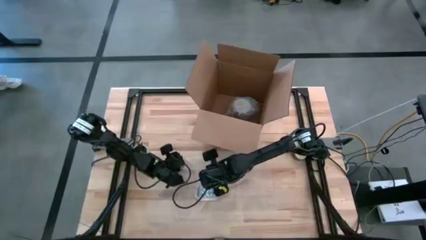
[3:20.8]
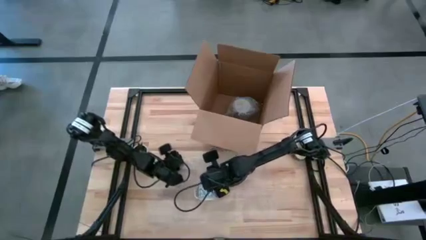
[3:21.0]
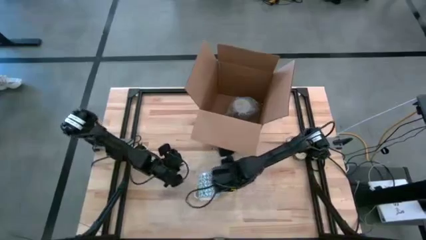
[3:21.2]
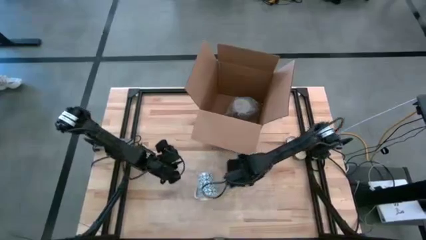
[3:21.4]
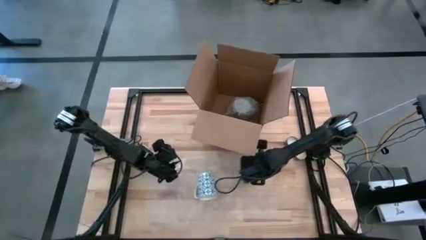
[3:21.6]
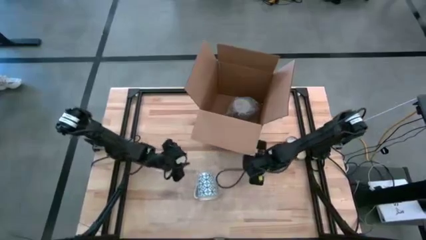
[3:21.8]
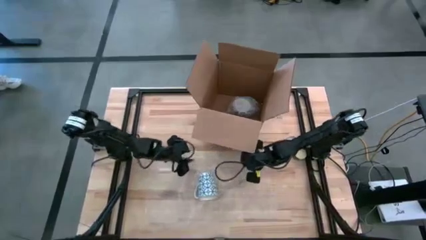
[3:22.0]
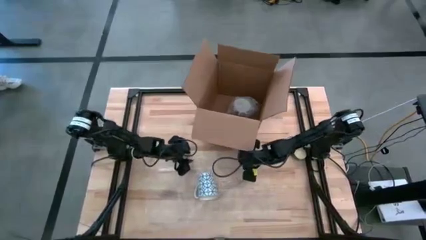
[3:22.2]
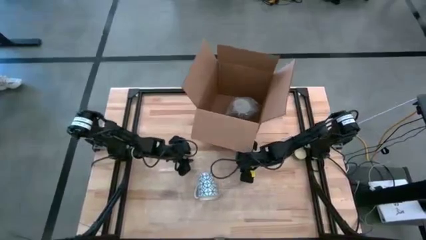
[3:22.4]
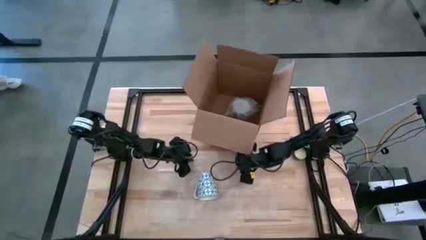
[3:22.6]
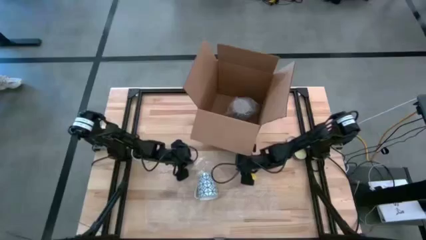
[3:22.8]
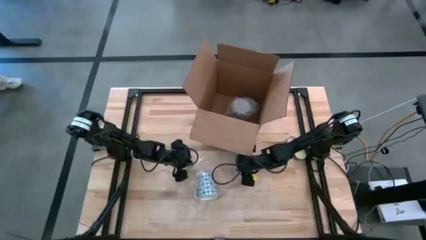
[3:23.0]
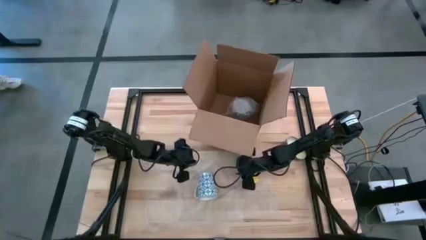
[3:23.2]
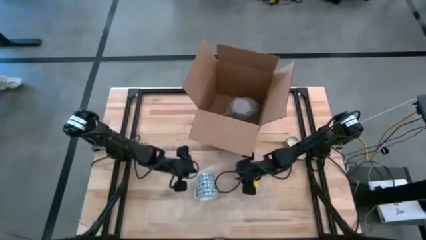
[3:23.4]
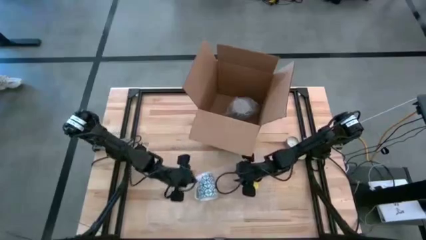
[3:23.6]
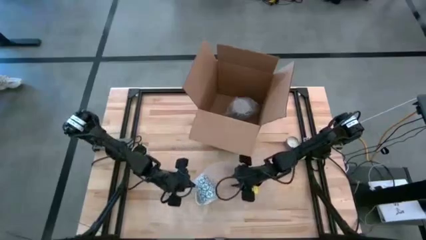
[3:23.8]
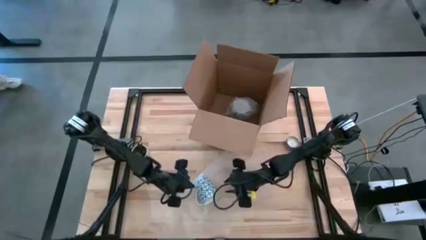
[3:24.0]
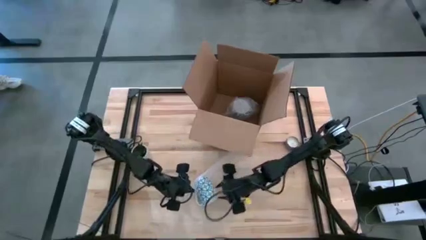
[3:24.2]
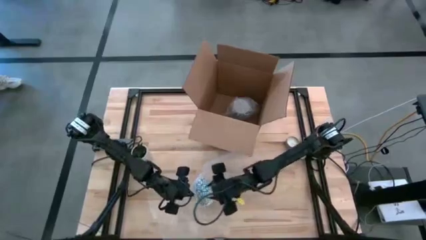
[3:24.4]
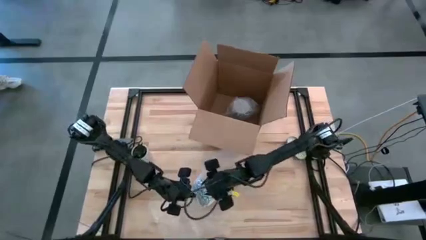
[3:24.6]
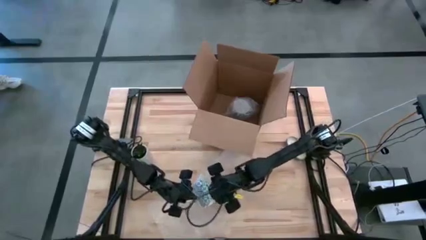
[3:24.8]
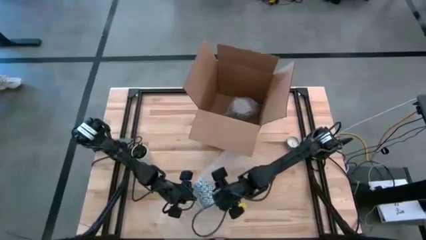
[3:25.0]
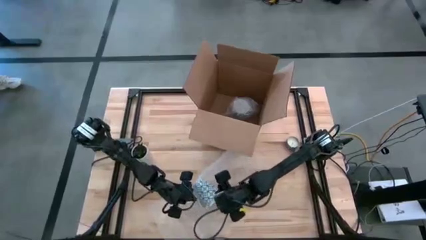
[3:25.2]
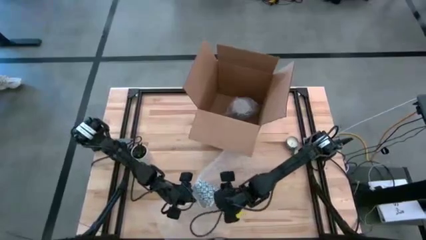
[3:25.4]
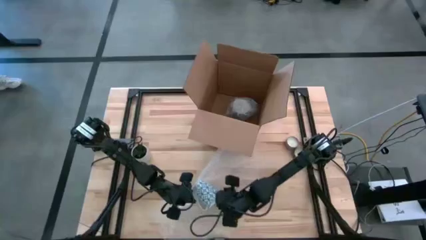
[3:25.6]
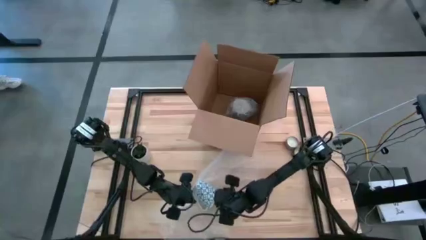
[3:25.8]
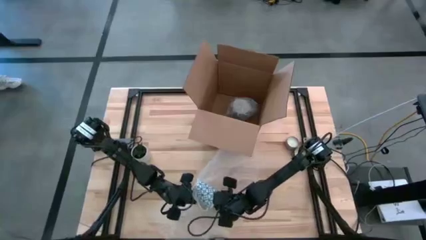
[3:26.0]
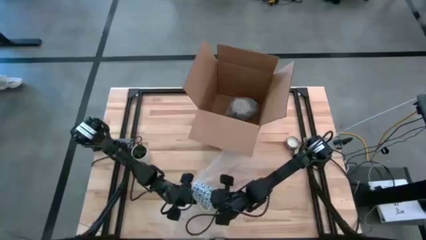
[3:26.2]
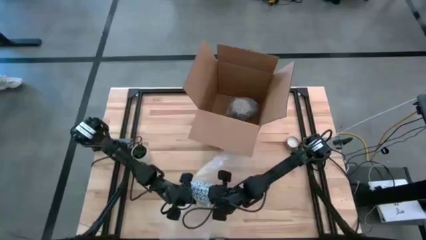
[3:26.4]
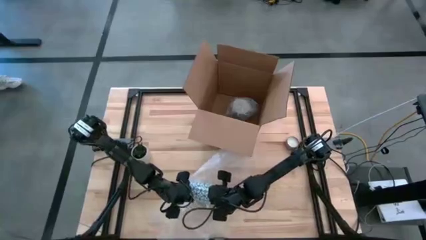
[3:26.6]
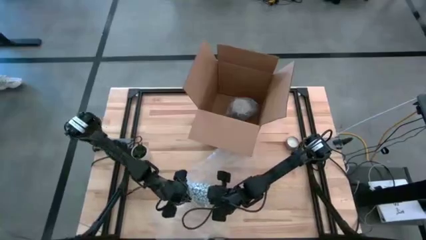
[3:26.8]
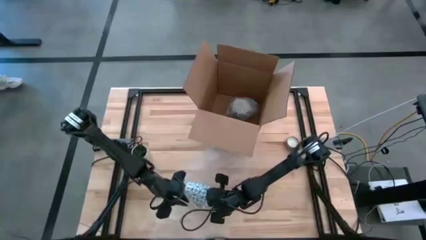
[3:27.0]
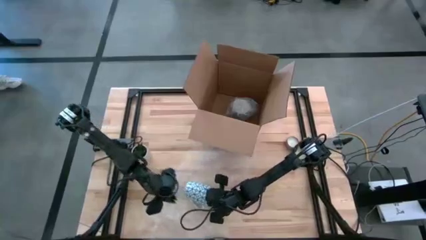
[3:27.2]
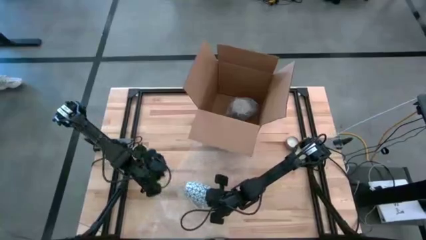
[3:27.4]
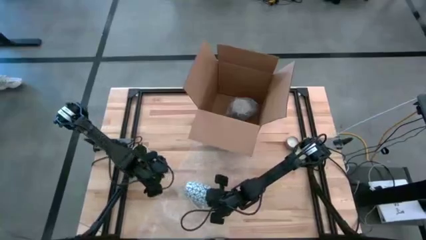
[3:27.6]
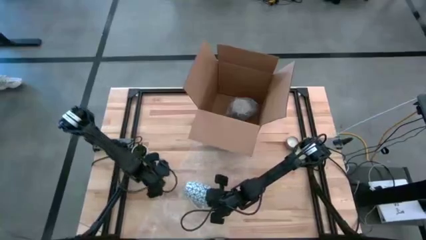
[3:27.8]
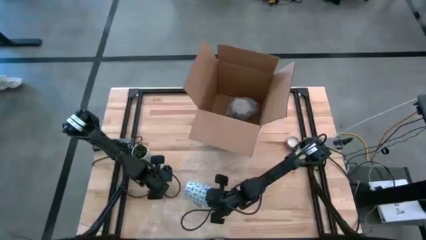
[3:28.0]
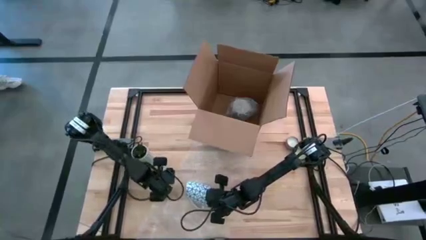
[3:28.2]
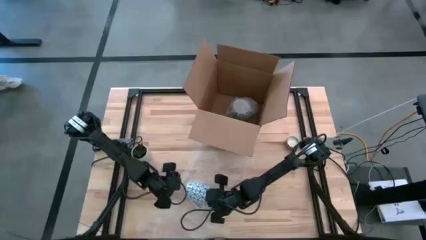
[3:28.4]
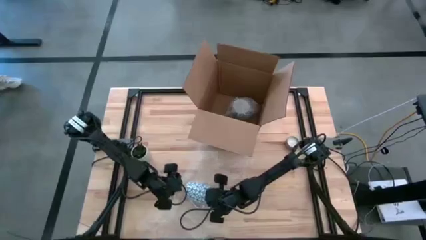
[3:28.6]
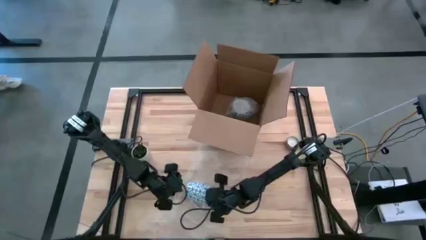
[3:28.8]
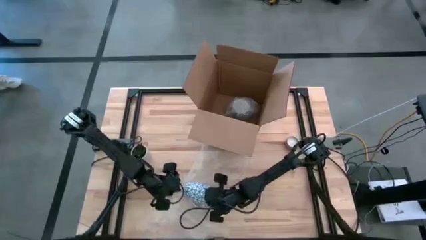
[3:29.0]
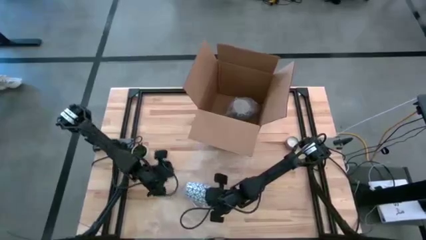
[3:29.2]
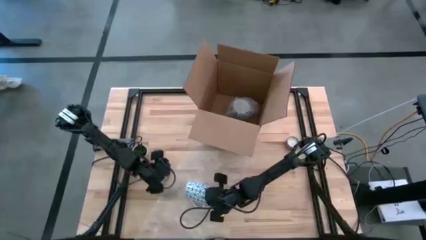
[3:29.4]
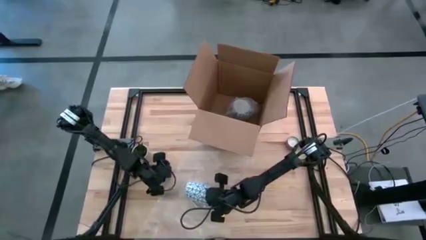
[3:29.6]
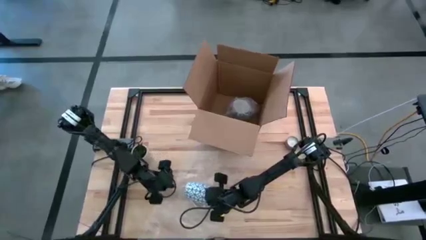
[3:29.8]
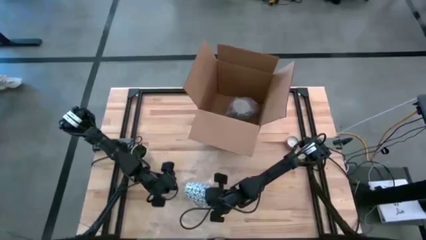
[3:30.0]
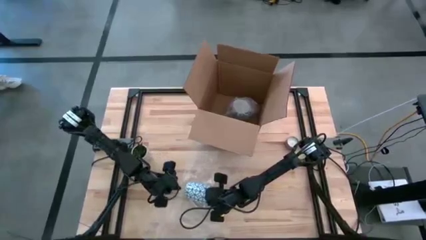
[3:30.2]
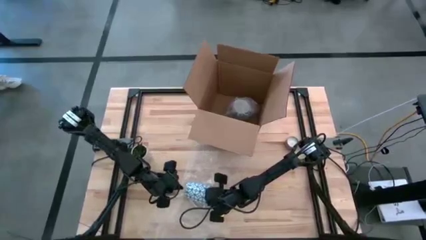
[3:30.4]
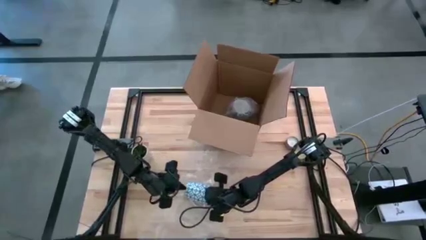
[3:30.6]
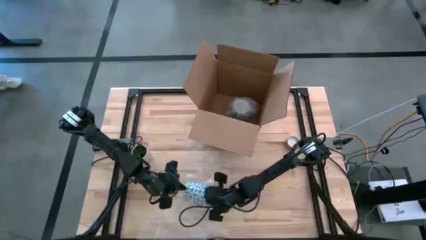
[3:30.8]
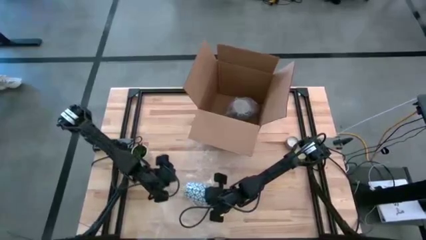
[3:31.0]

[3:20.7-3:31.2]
Task: wrap mug
Wrap the blue patterned mug with the bubble wrap

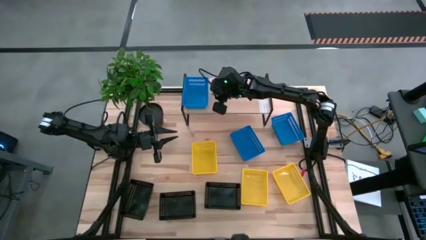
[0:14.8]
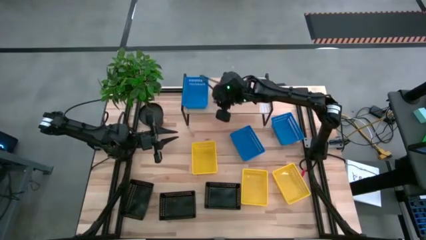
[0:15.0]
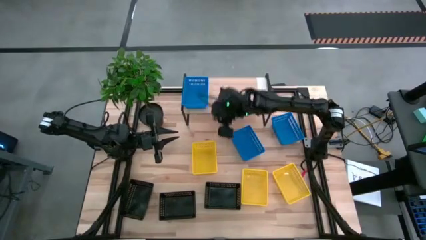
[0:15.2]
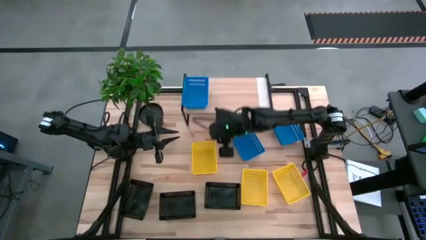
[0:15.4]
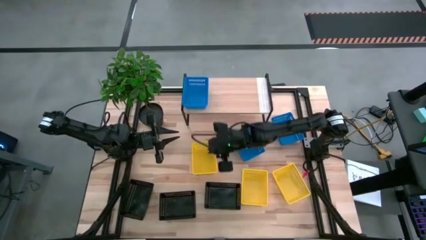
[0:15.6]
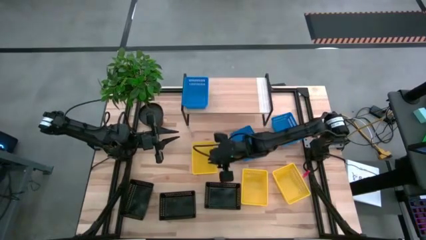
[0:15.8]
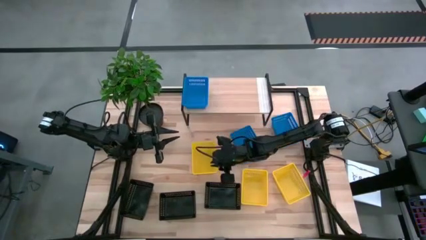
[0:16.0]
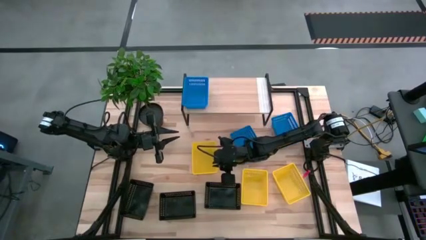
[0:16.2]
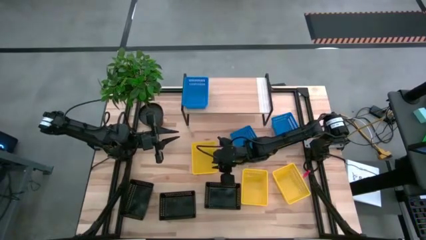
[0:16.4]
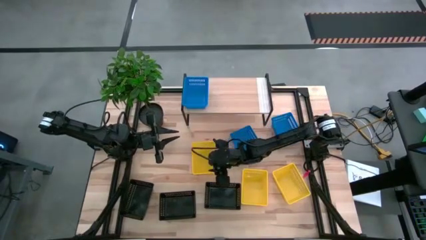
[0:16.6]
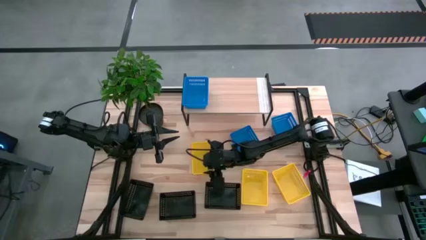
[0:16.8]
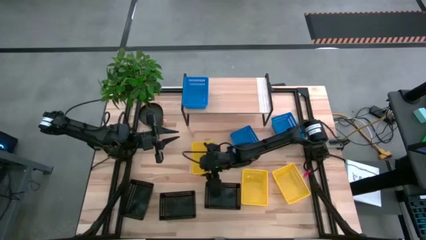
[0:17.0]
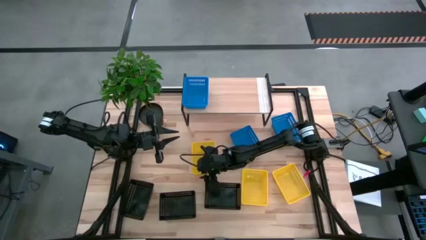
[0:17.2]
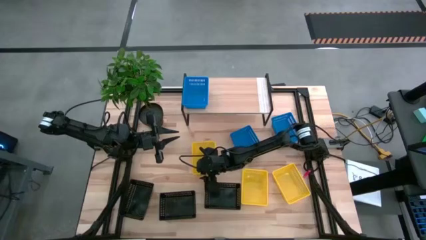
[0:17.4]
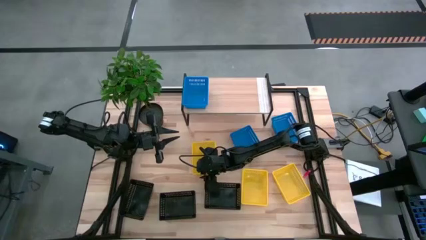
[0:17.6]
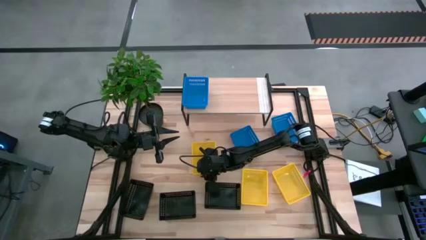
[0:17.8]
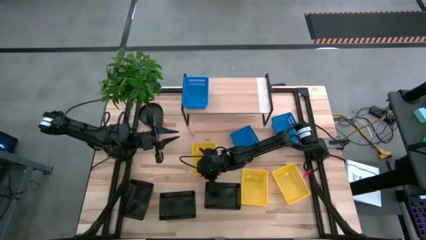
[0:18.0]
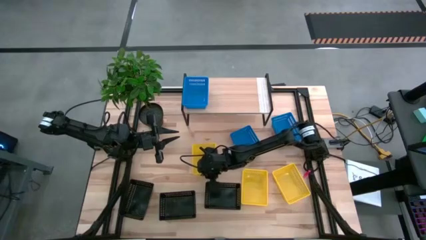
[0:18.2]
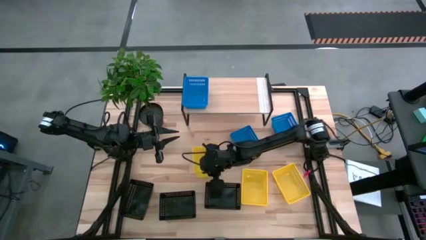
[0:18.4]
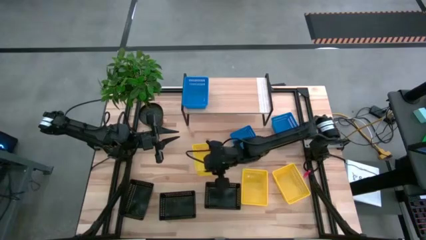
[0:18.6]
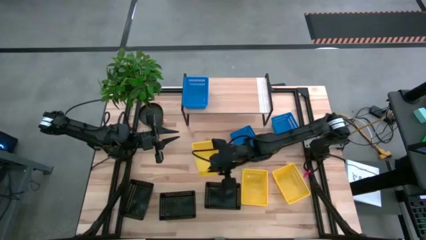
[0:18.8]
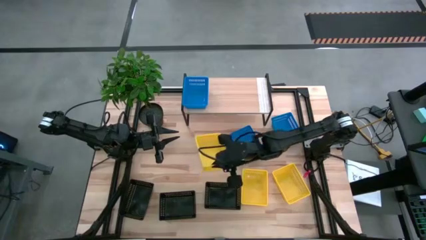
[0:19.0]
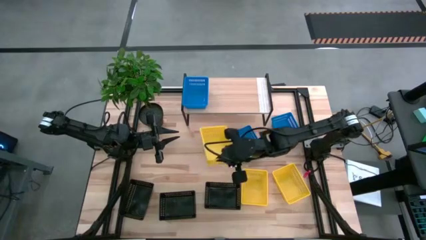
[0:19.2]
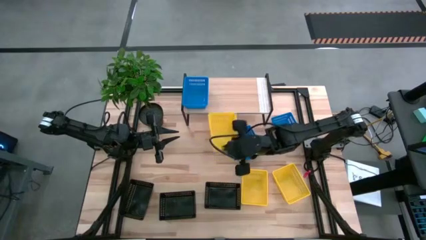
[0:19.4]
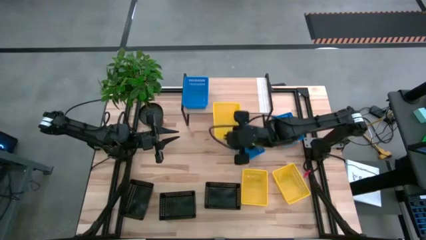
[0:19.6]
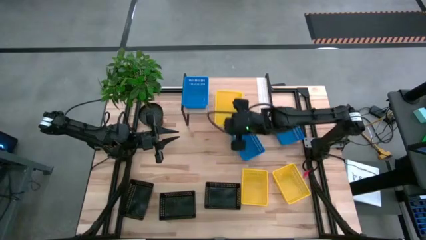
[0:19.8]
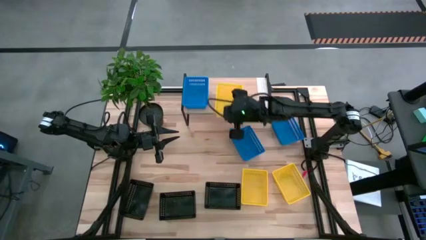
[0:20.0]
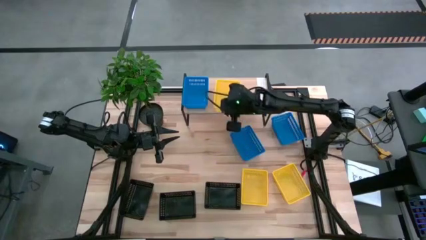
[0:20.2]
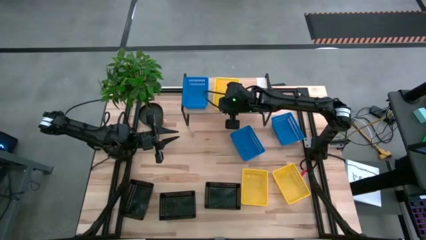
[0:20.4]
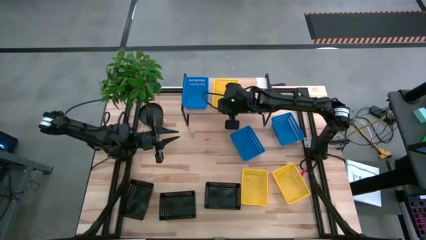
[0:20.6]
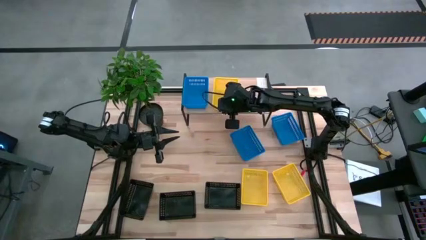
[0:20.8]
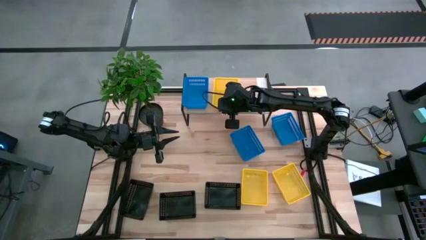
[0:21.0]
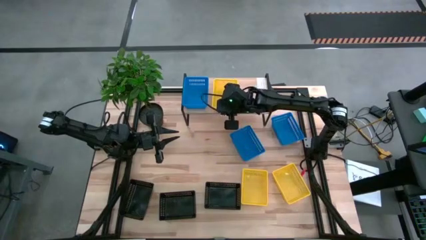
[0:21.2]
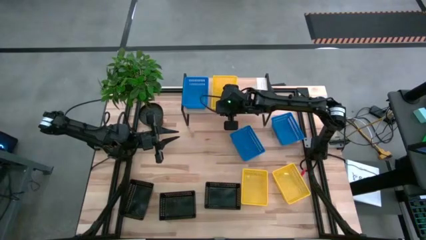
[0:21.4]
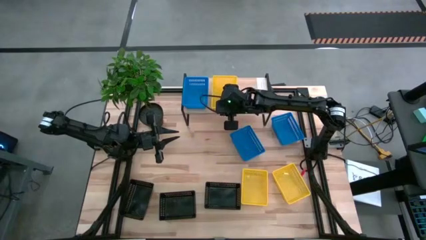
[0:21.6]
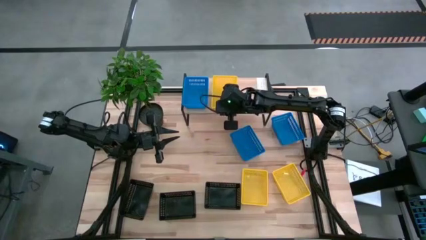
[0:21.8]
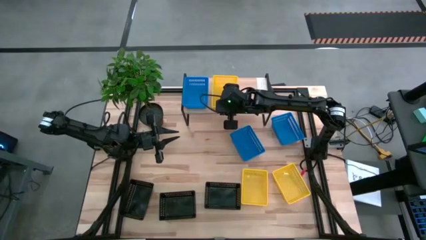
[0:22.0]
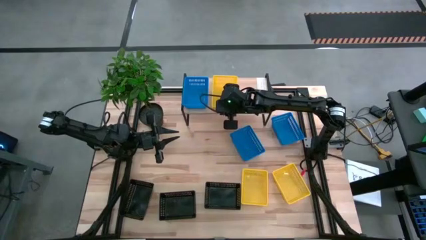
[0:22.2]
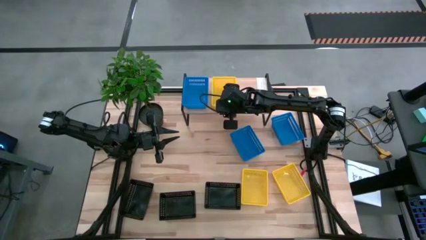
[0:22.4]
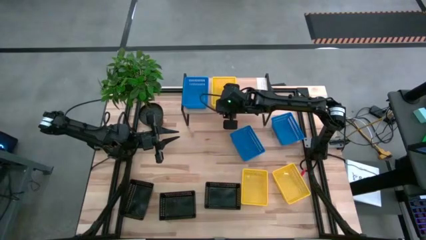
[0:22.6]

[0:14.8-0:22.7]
Task: Stack baskets on shelf by color
Put the top yellow bin on the shelf
